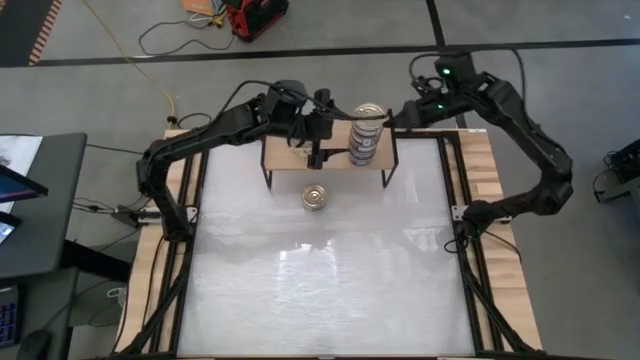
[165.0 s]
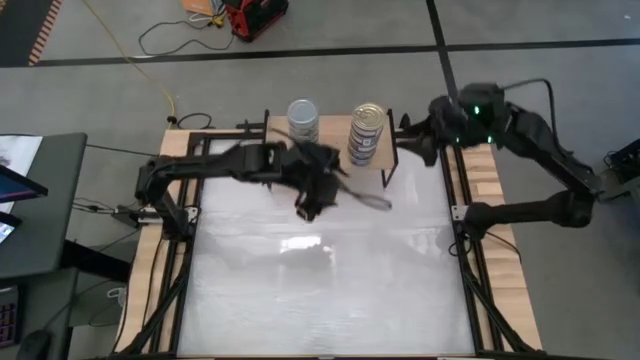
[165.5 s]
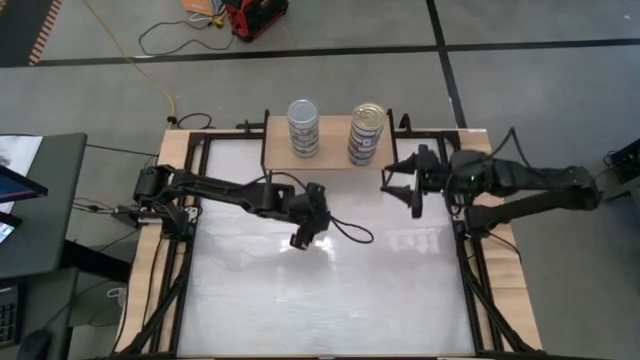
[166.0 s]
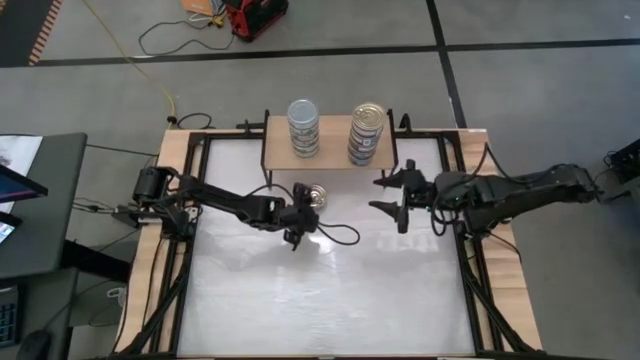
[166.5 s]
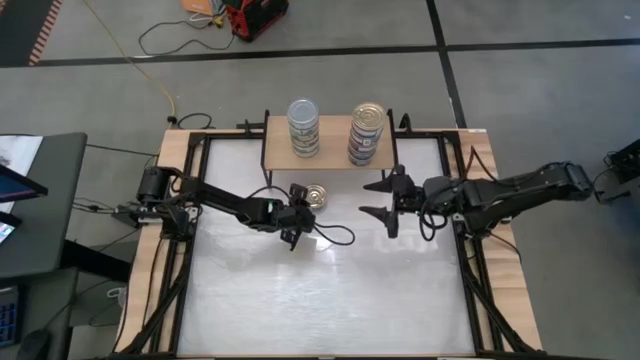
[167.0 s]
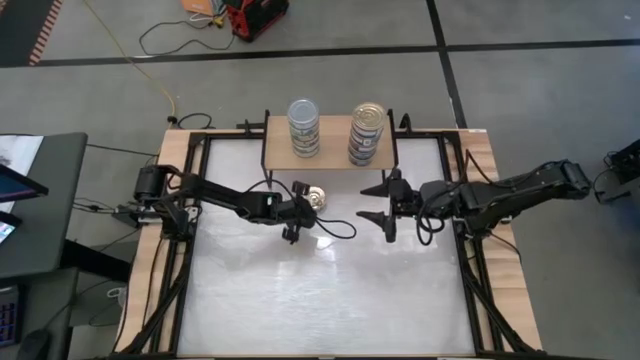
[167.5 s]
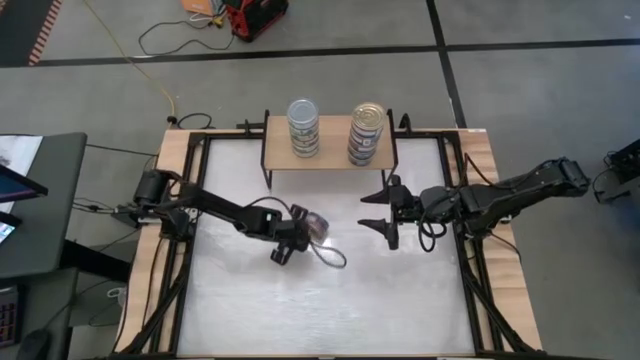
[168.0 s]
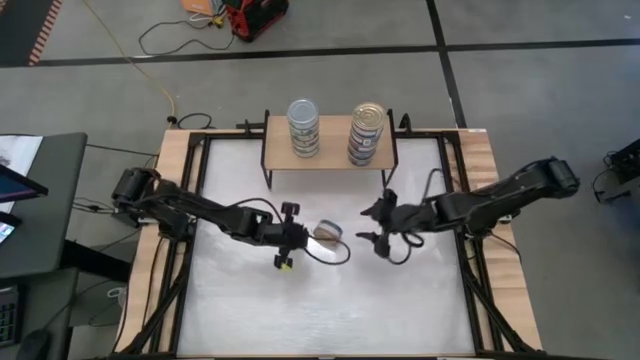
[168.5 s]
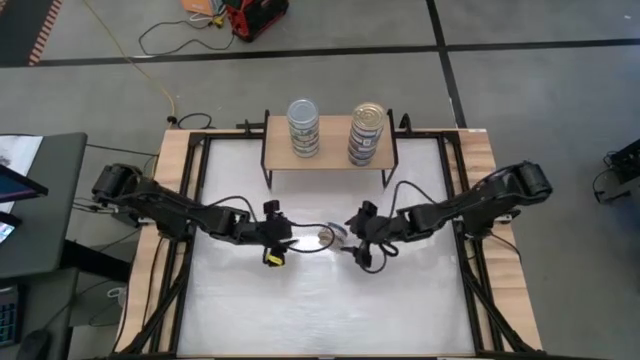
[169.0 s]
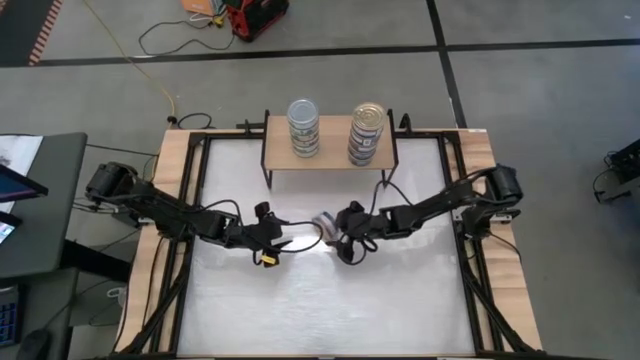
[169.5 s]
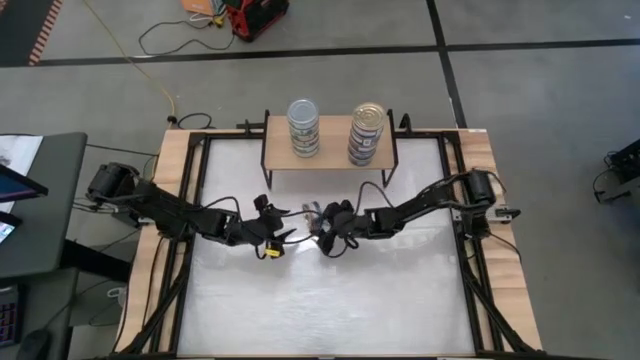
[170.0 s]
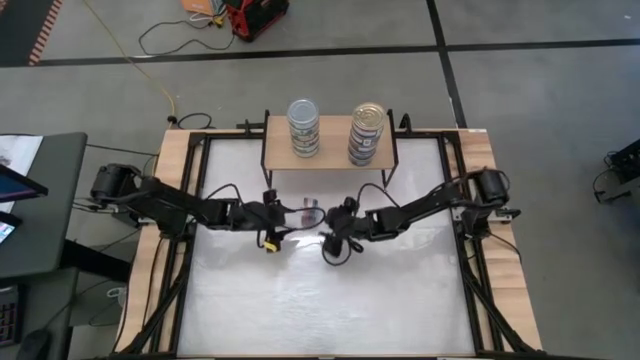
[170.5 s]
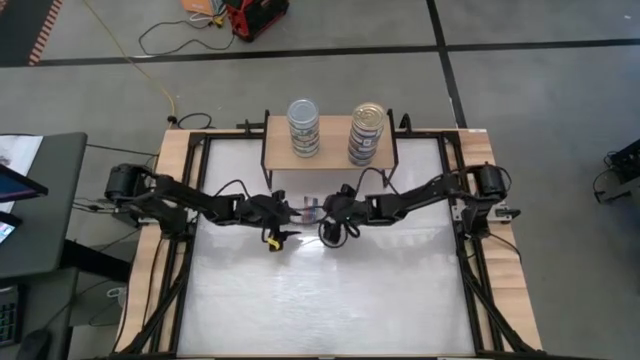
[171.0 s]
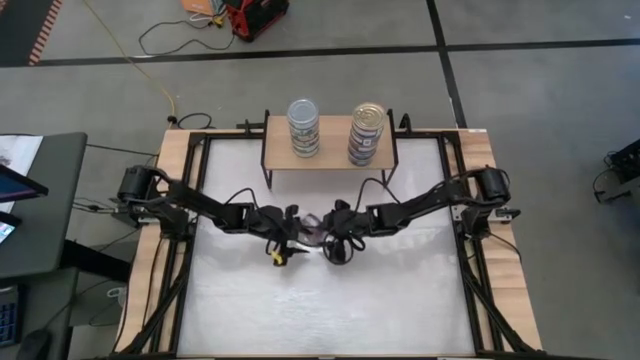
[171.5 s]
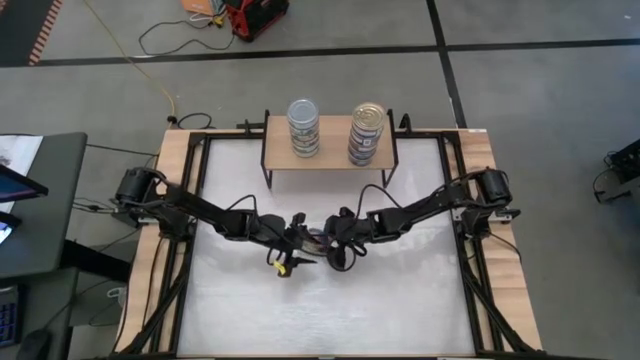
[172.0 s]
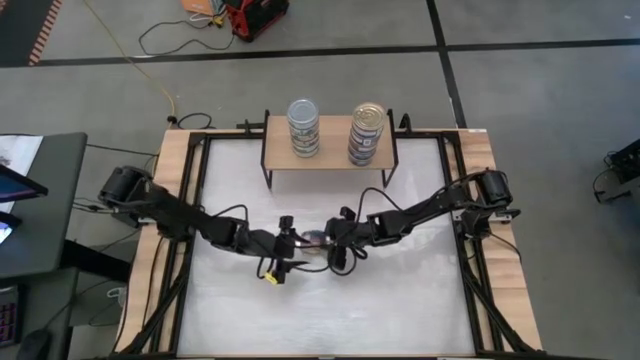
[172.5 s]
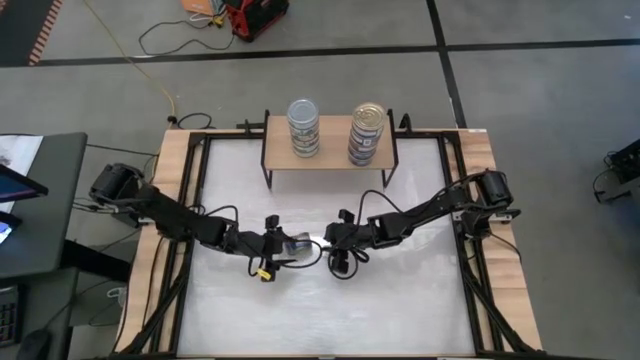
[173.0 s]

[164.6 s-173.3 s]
Task: Stack canned seafood by type on shelf
Stack the blue pink tuna can on top of the other blue pink cans on the shelf

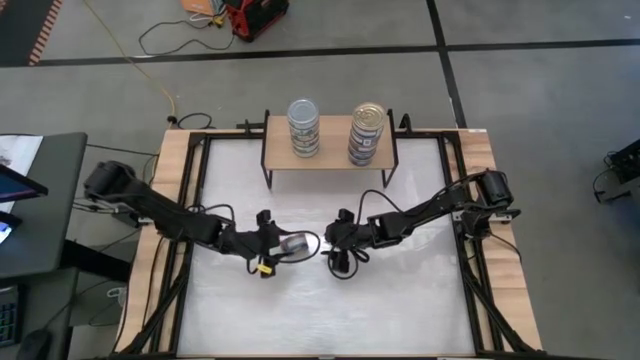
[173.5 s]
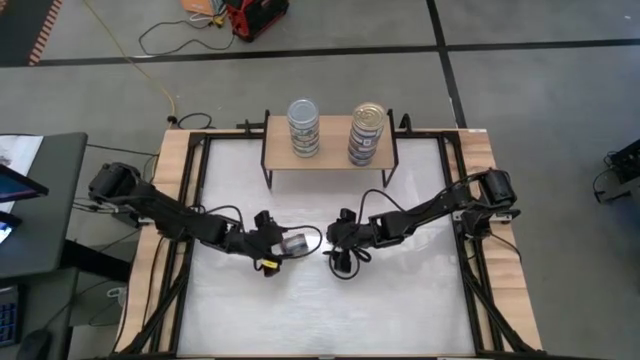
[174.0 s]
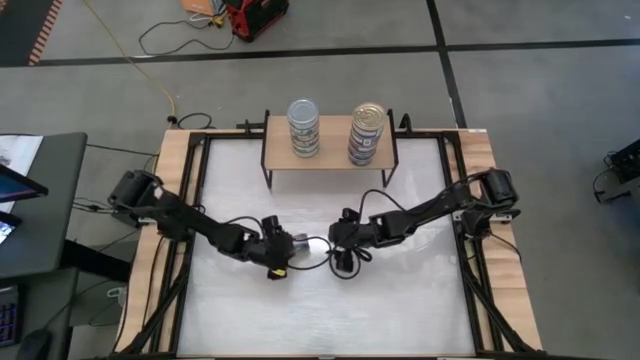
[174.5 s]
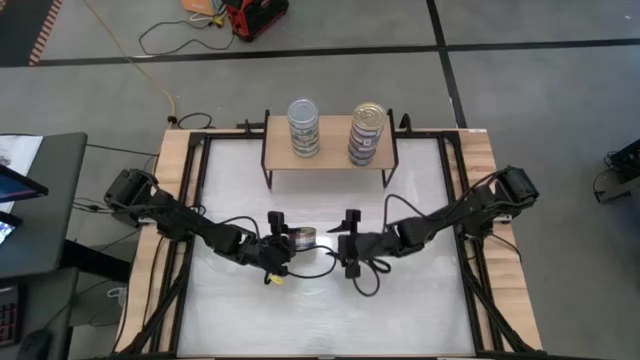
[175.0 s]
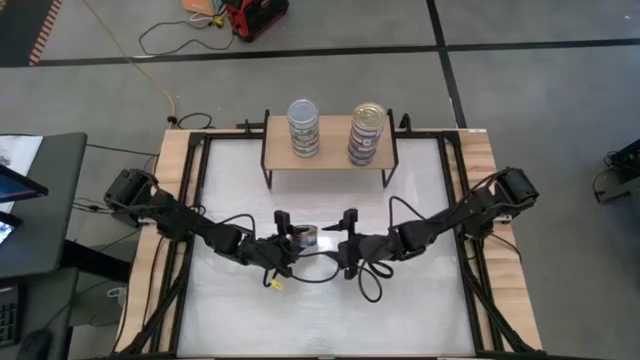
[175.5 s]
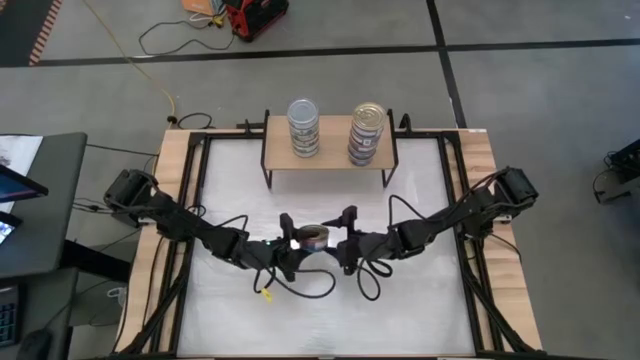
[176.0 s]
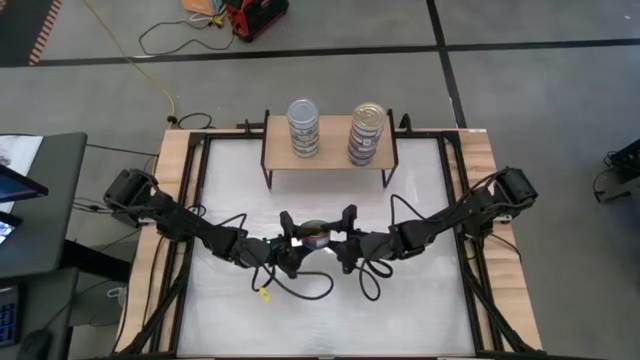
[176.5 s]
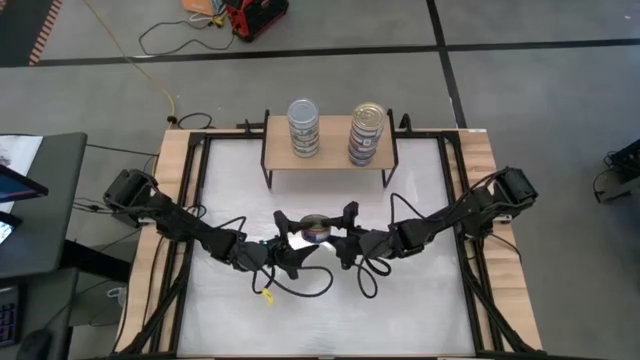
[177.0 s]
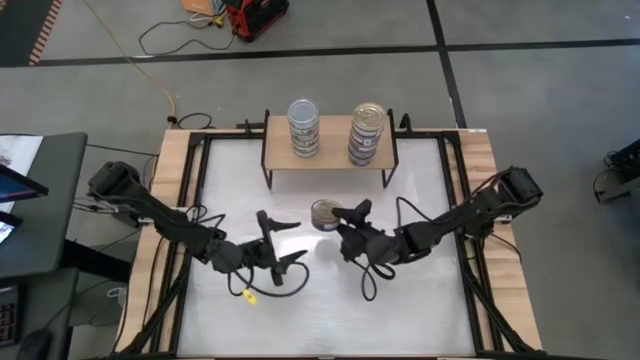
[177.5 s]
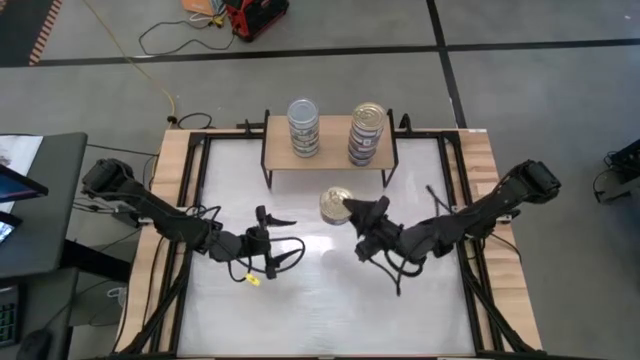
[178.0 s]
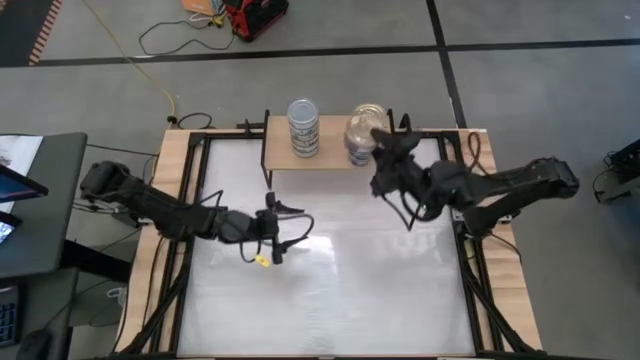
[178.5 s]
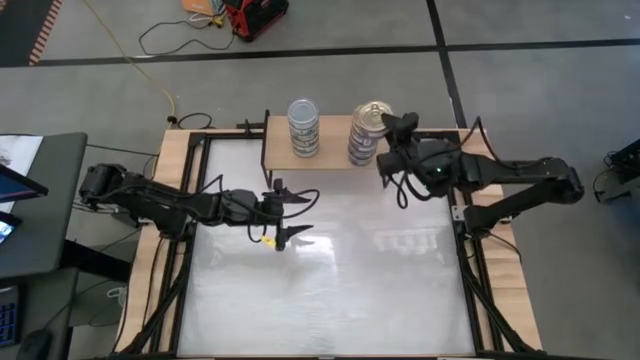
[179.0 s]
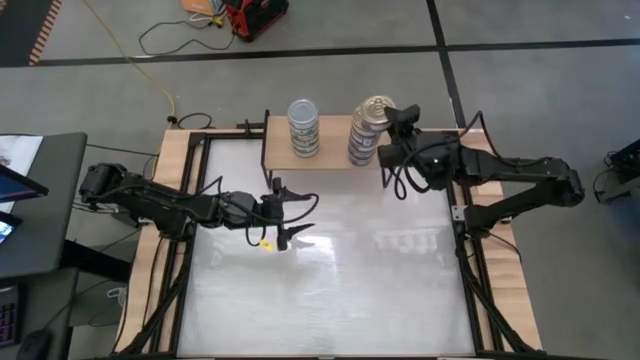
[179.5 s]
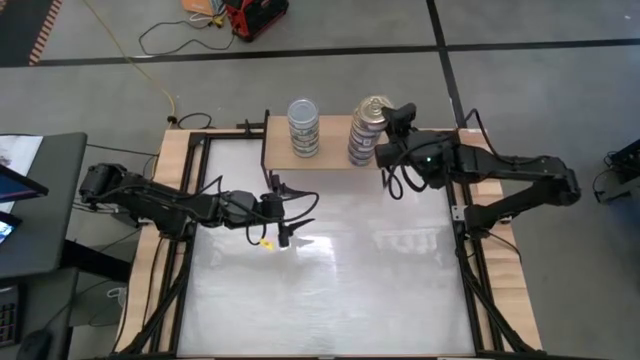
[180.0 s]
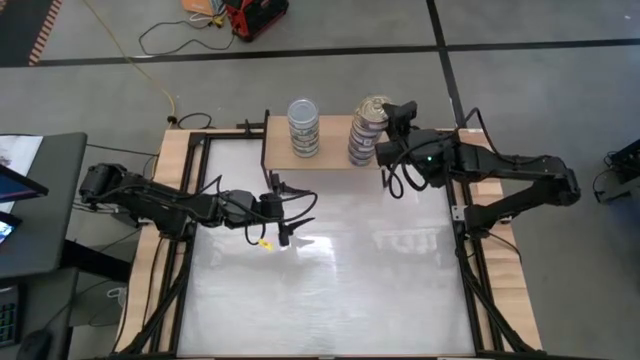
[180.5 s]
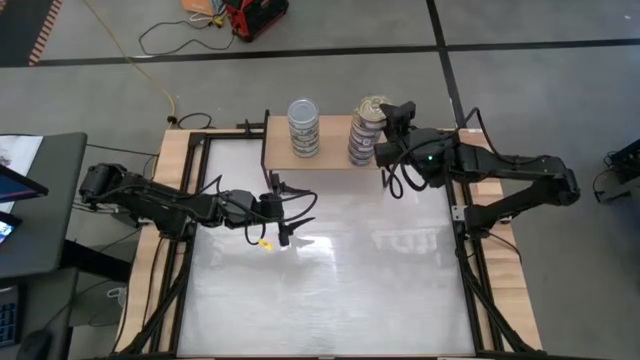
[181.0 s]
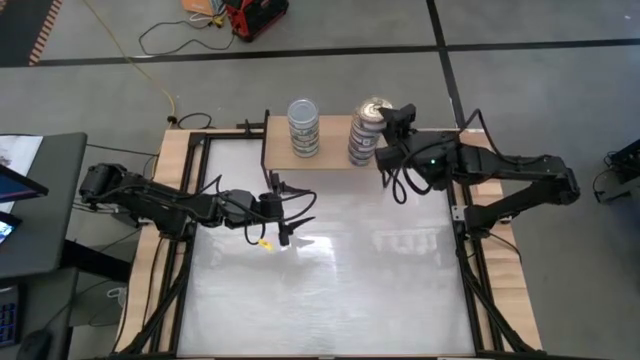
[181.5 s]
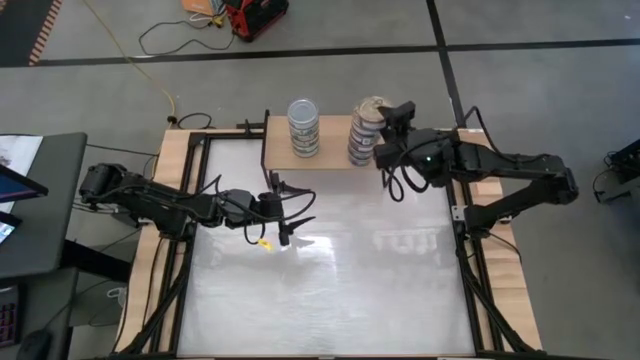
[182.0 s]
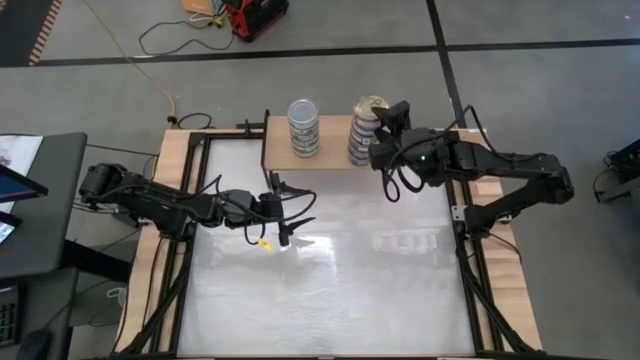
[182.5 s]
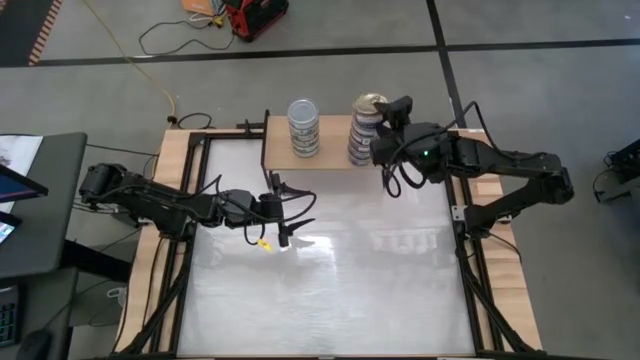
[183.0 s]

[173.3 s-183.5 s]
Stack the blue pink tuna can on top of the other blue pink cans on the shelf

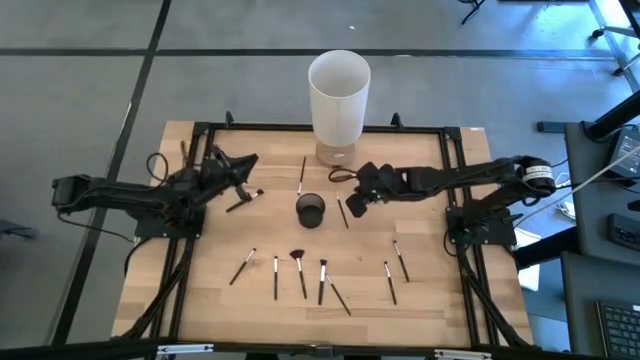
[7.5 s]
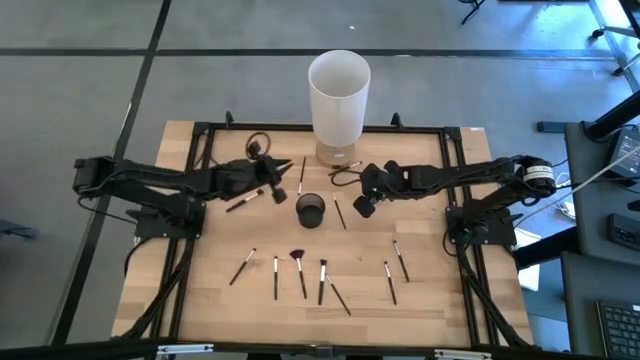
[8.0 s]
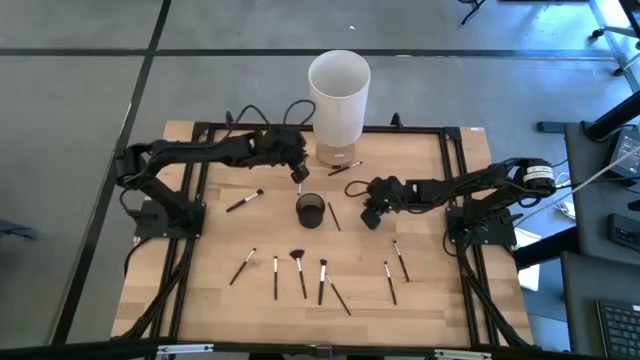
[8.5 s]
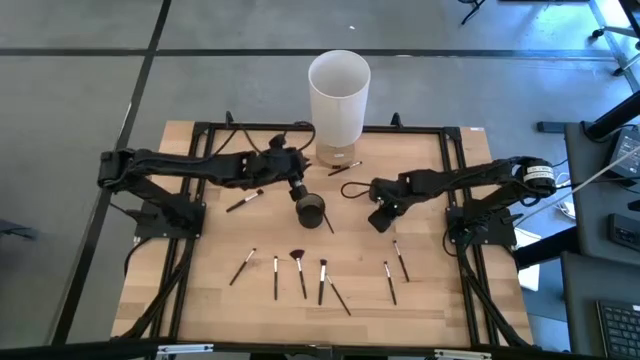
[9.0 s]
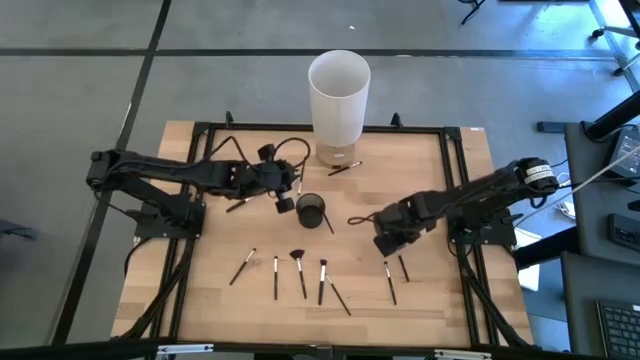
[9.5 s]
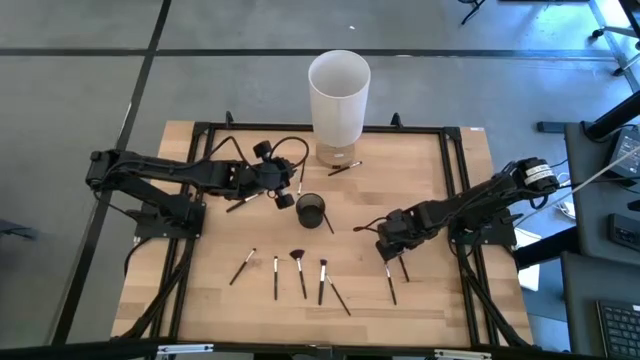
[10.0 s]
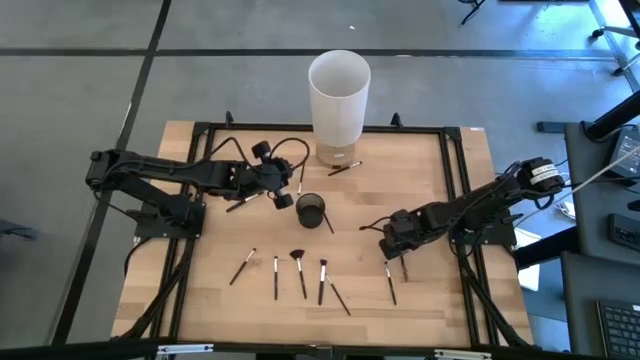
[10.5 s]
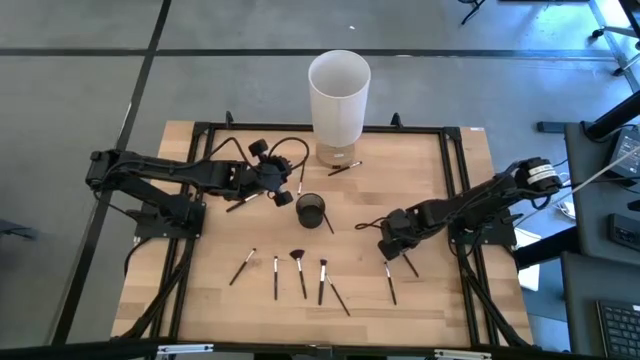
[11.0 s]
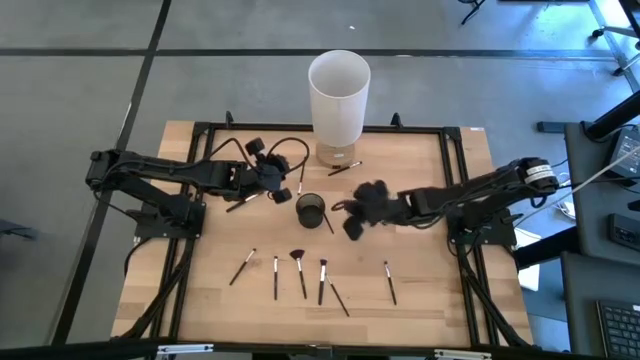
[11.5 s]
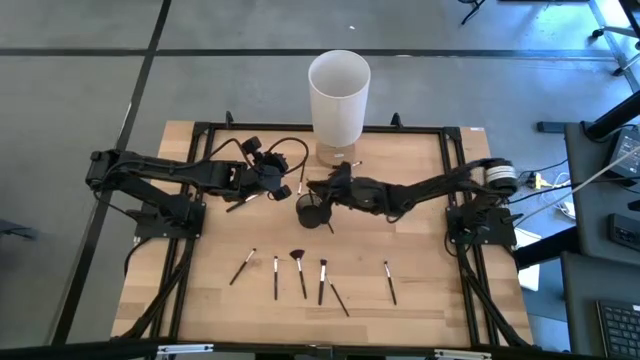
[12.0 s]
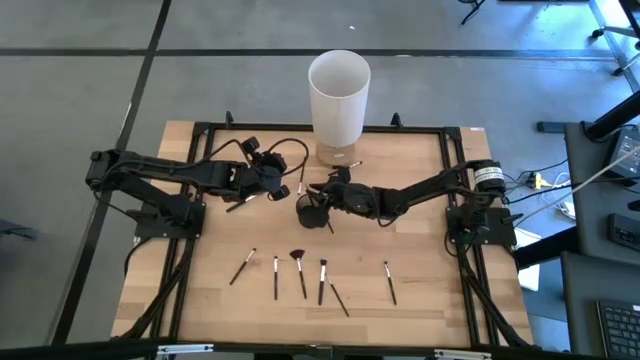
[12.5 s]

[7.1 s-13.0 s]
Task: Put items in baskets/containers
Put the black eyeshadow brush into the black pen holder
